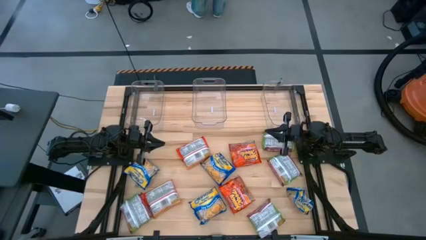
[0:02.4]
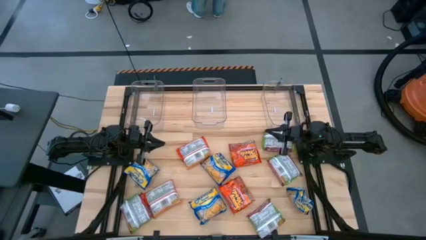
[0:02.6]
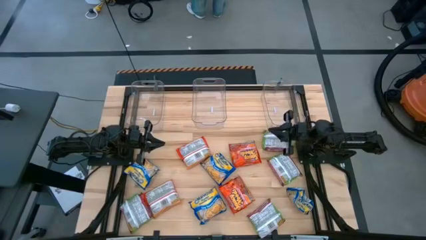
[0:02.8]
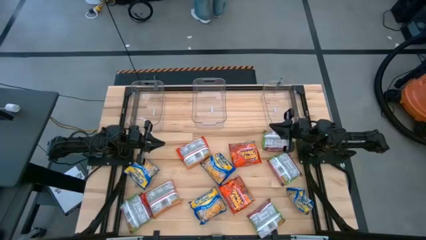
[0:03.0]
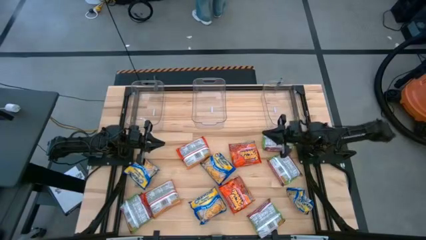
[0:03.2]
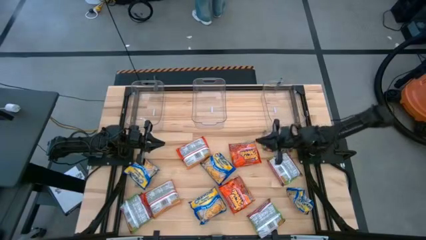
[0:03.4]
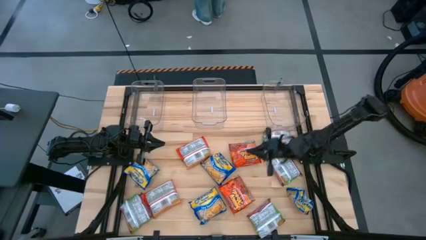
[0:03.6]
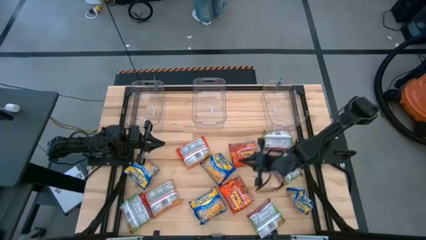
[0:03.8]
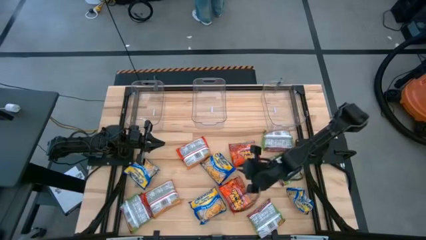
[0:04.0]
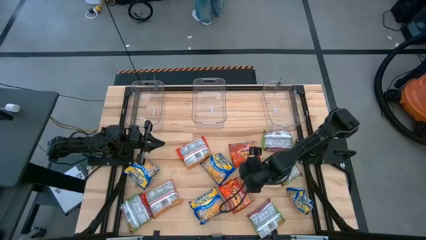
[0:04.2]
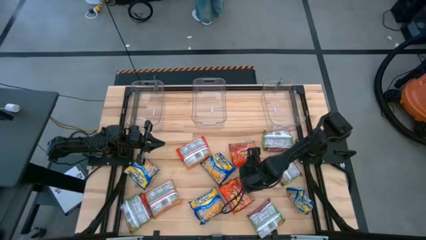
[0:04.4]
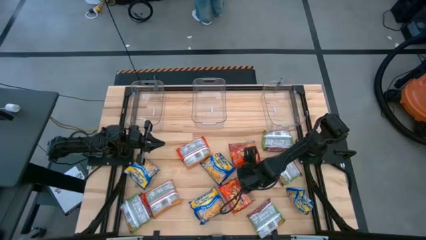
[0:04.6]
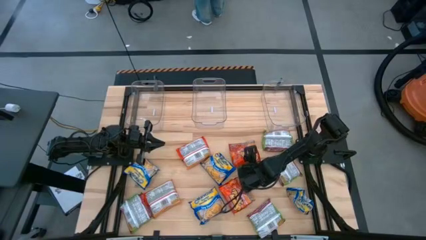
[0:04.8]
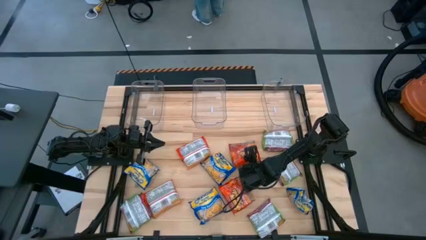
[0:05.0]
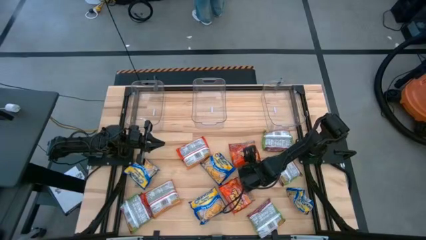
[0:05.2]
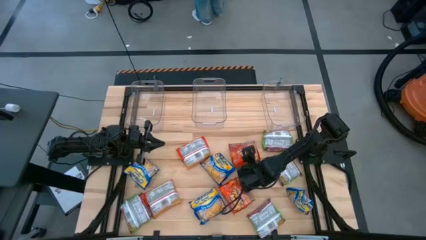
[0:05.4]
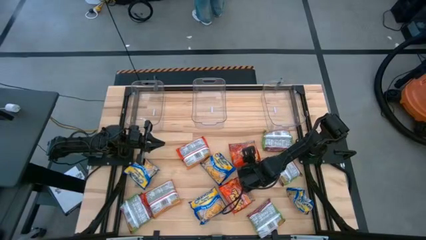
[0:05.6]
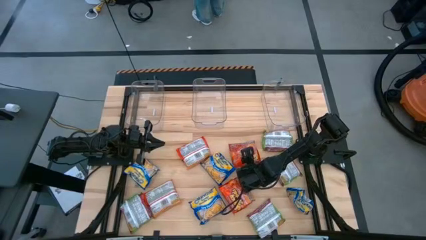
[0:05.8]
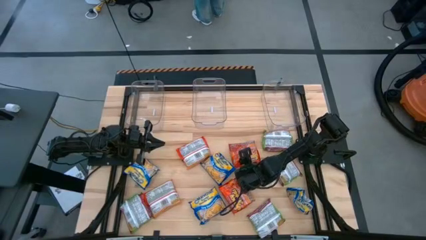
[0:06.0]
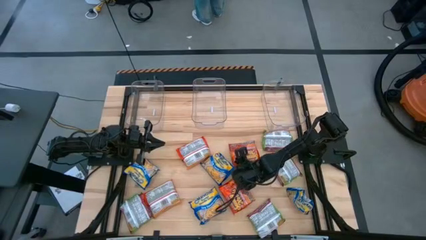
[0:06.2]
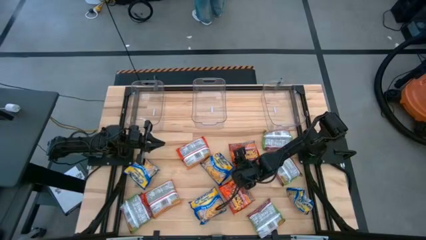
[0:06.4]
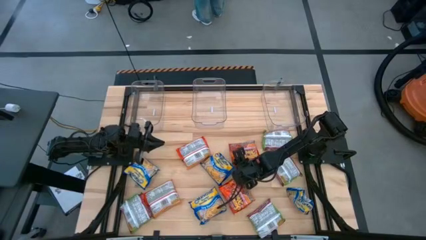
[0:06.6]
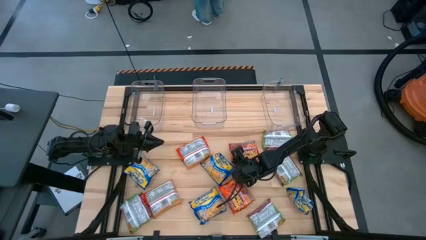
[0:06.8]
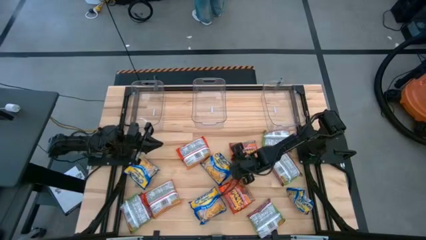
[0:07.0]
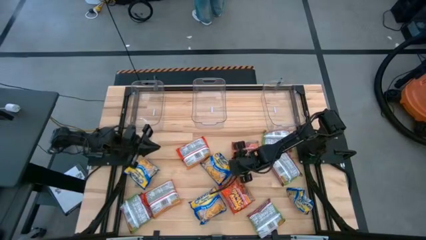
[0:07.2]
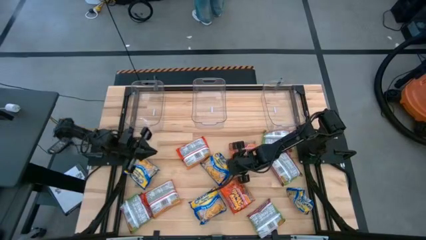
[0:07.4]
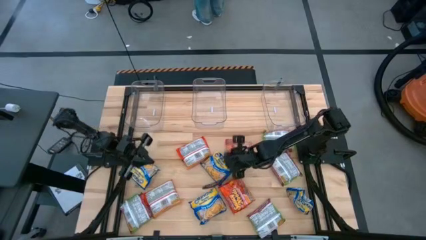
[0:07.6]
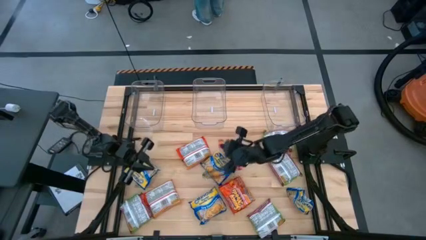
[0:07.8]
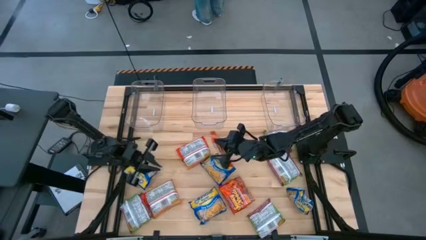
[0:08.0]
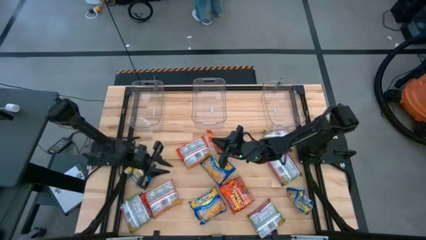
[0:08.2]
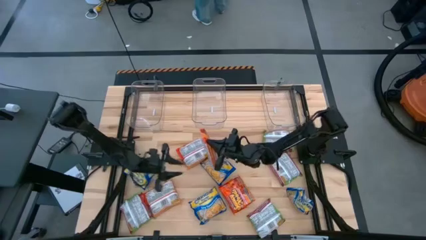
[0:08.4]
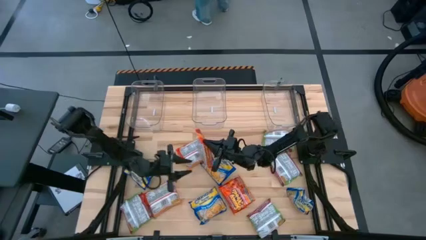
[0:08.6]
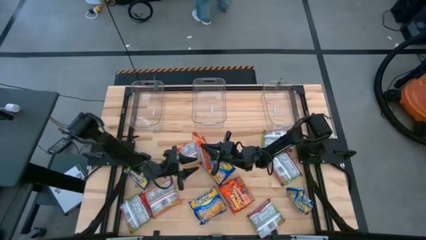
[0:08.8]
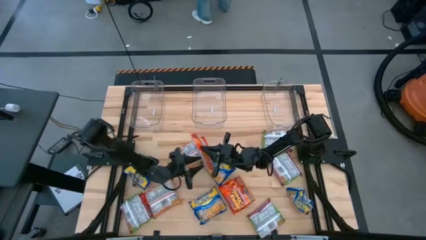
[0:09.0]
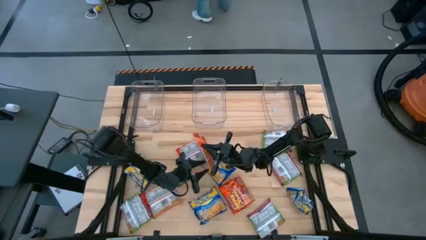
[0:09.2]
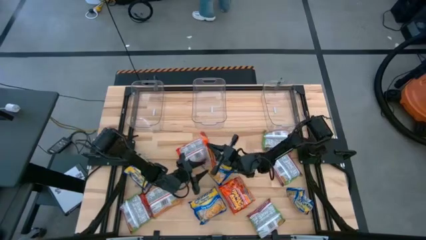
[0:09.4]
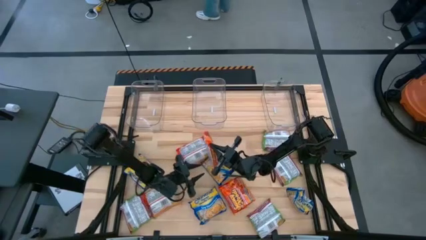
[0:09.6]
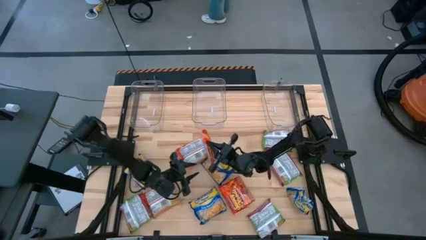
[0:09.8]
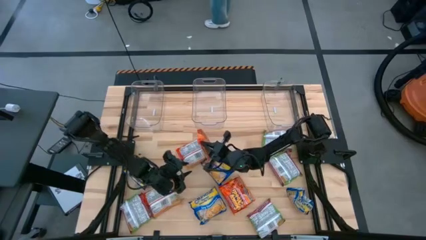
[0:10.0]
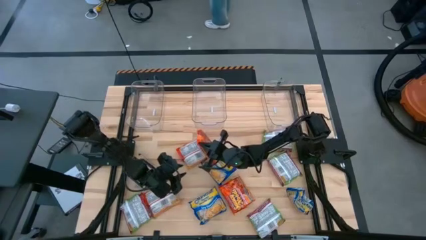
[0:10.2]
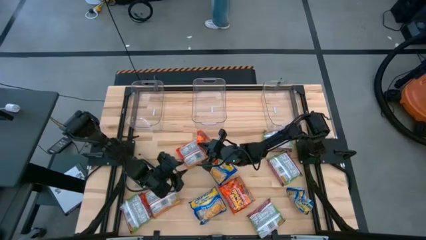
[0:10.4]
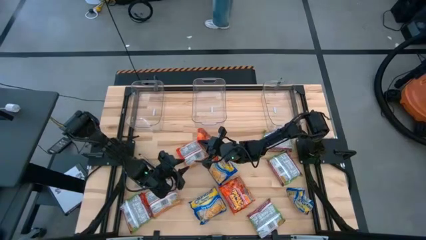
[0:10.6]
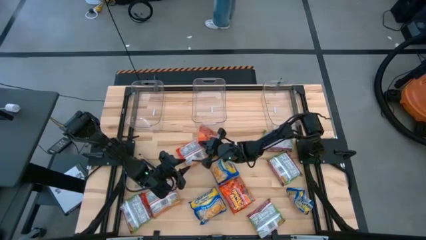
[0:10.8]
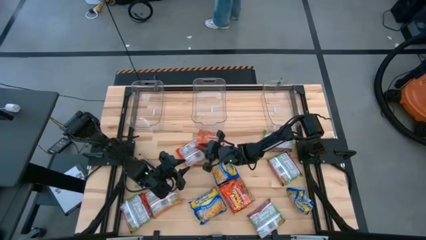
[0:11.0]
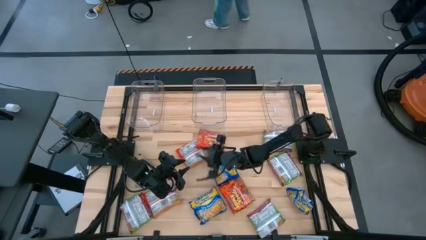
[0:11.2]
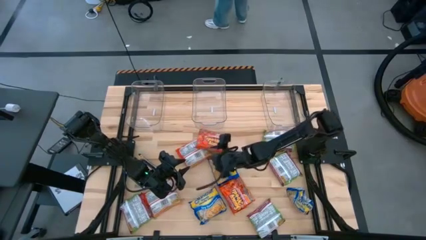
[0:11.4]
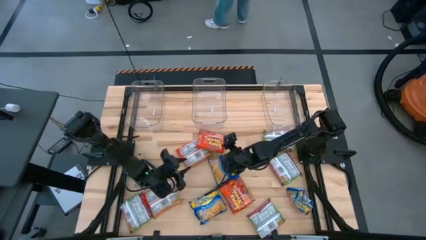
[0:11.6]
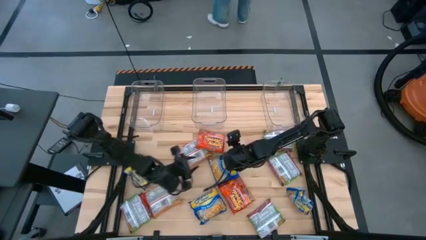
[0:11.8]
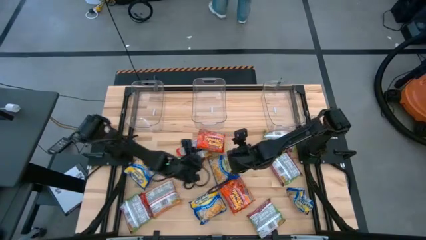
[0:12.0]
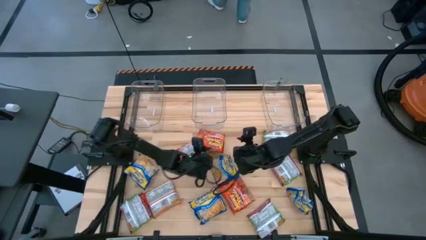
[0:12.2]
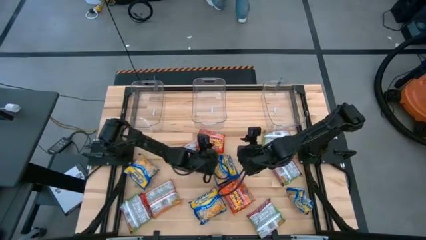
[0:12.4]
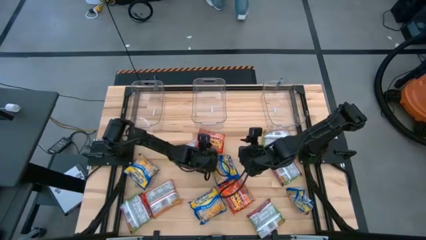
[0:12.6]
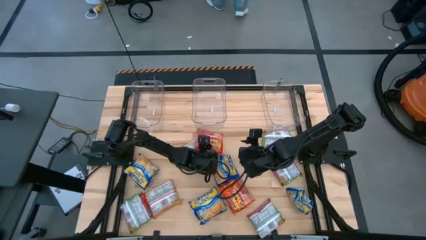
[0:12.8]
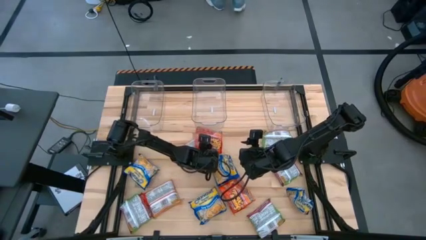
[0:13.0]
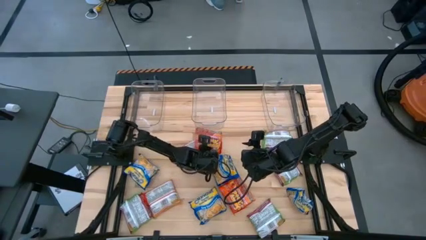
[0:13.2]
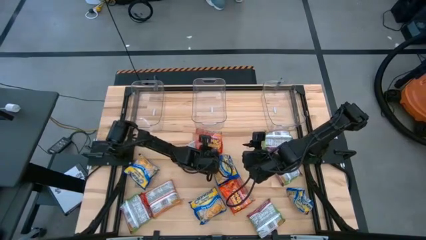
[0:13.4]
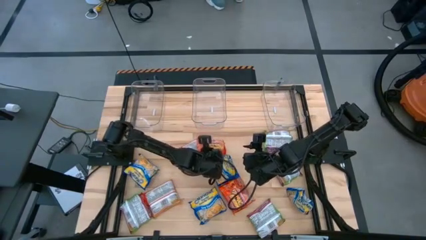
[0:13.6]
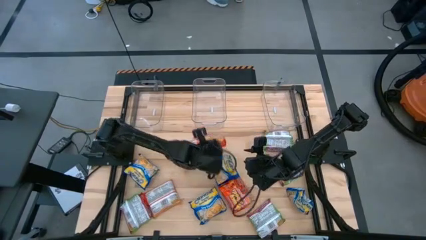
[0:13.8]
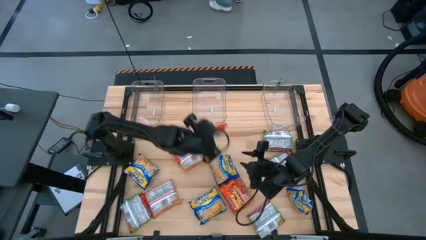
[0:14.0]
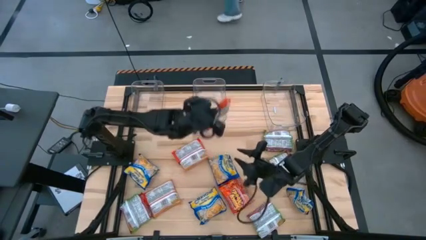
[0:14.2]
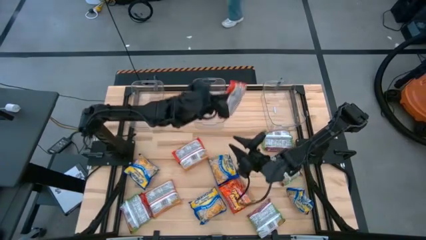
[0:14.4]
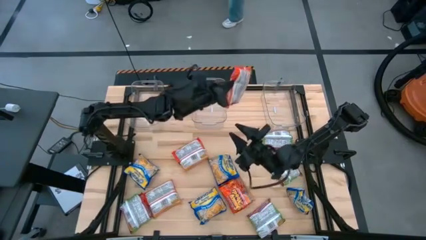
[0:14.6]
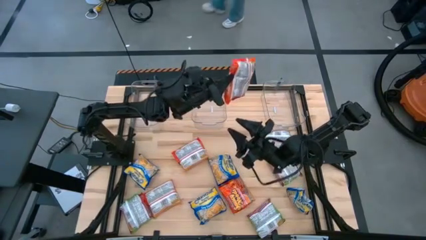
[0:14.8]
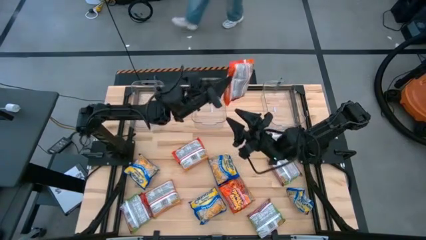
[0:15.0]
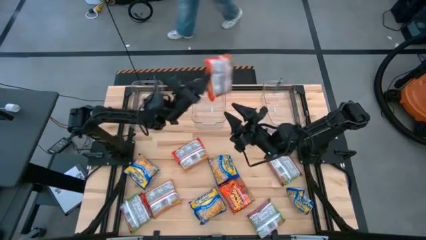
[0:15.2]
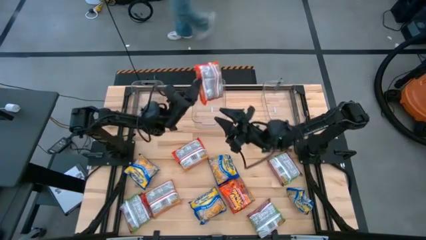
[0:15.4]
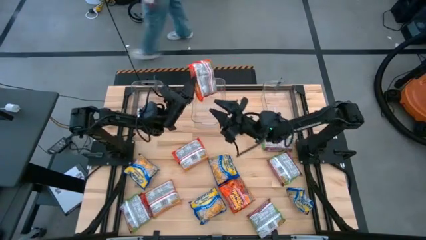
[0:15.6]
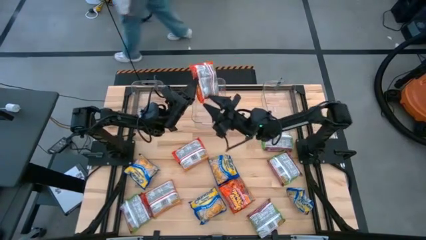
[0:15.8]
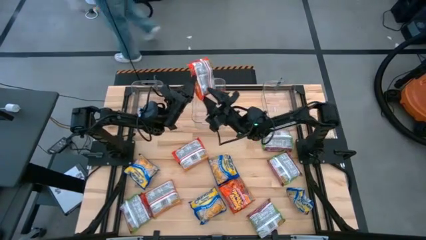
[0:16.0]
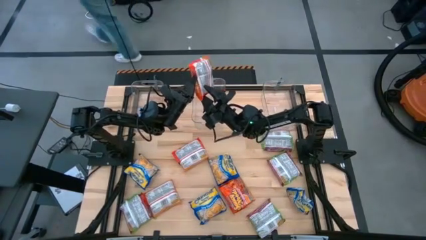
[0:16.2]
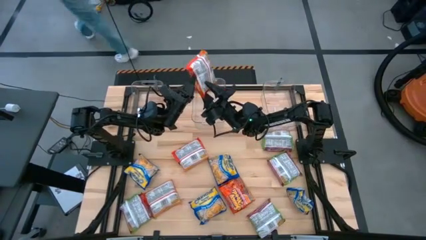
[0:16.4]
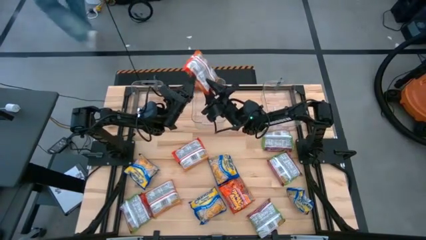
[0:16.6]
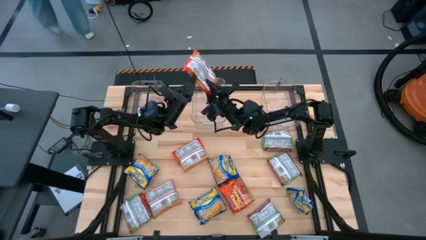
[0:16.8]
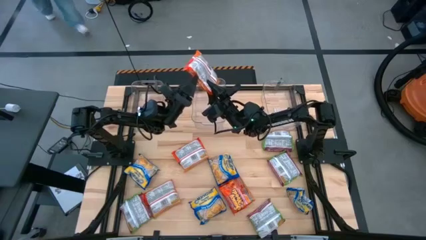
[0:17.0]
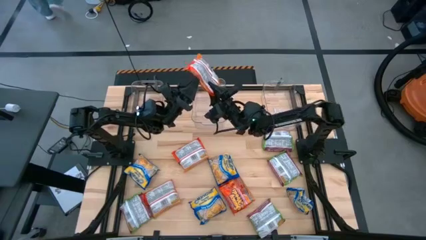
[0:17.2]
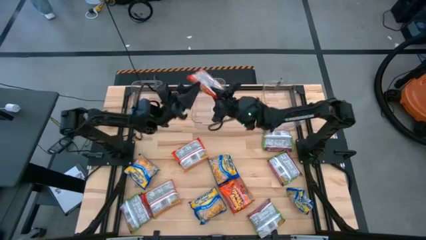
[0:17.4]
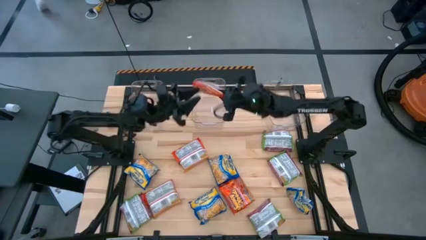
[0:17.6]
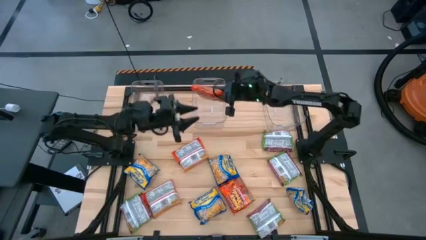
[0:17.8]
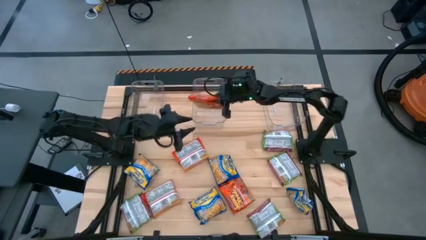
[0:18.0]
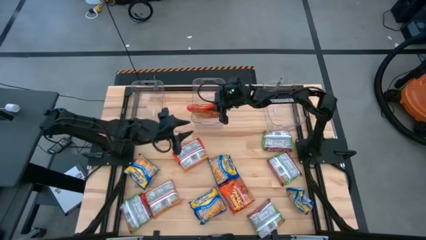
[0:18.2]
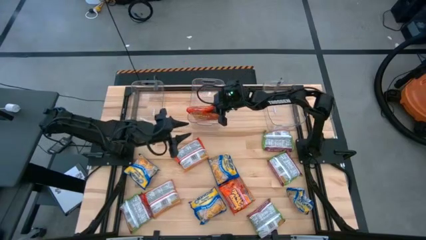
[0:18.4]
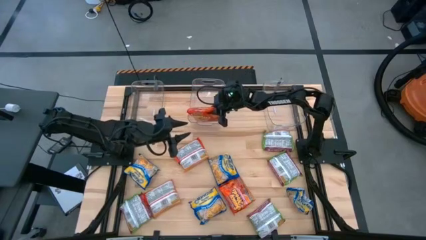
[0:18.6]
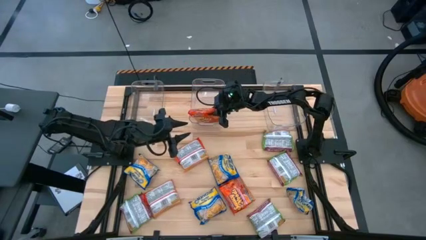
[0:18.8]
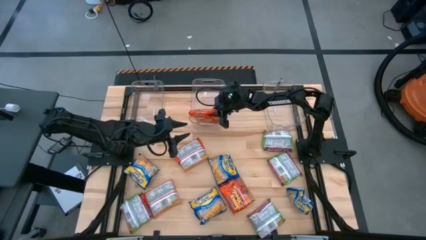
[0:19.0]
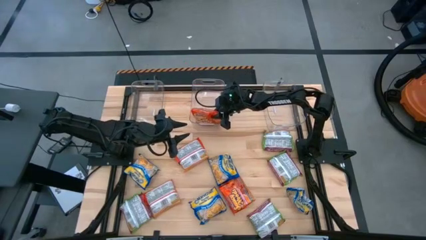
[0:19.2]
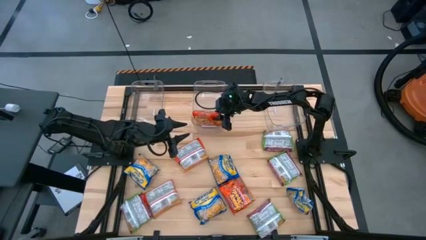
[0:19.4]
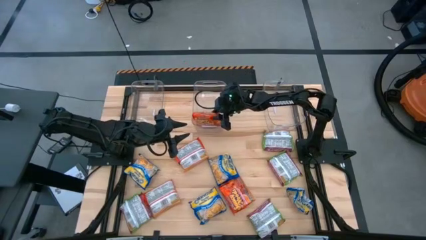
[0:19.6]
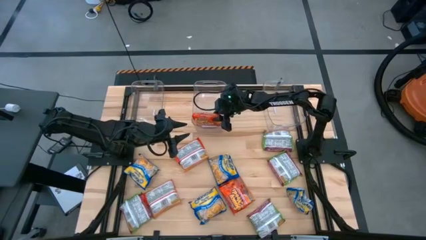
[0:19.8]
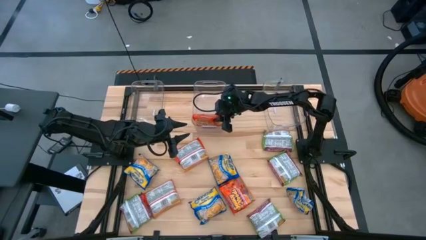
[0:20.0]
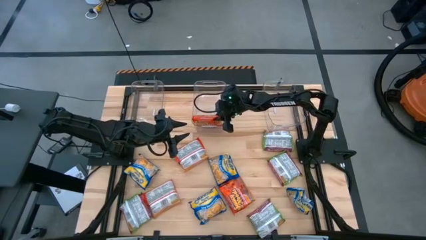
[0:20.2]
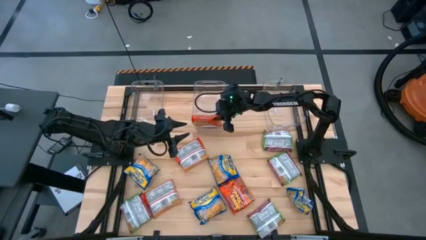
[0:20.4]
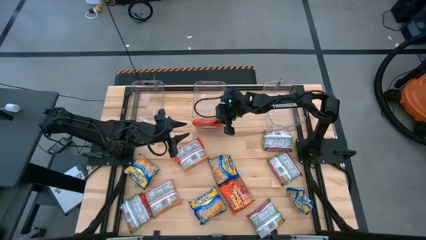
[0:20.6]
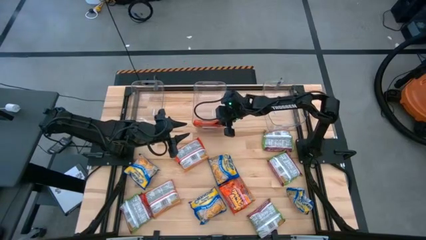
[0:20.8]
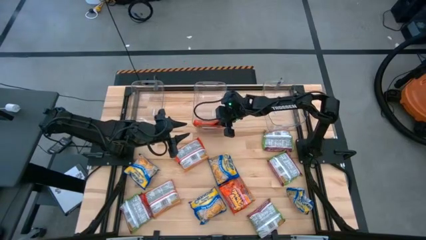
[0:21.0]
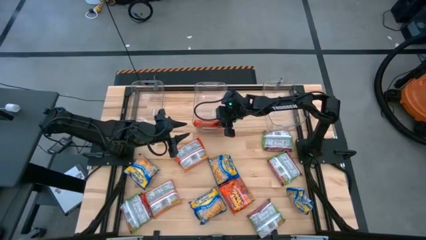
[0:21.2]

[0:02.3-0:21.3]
Task: Sort Maruchan noodles
Put the orange noodle pack into the middle transparent bin
